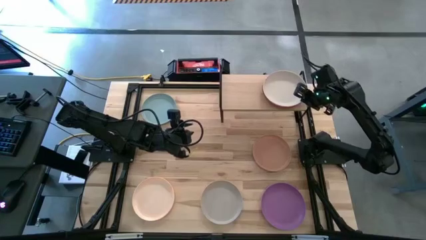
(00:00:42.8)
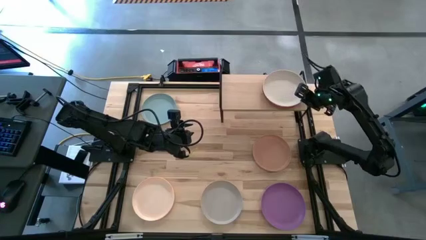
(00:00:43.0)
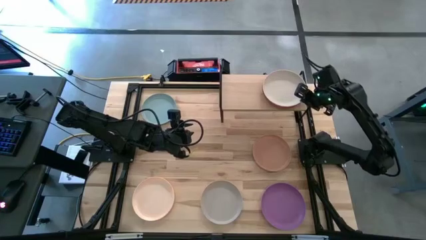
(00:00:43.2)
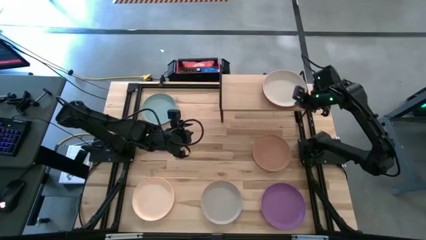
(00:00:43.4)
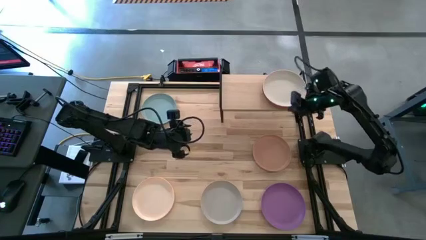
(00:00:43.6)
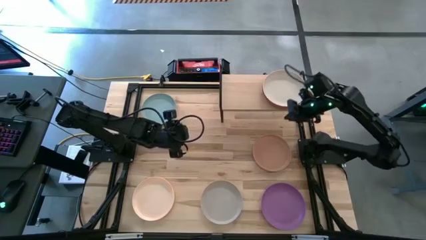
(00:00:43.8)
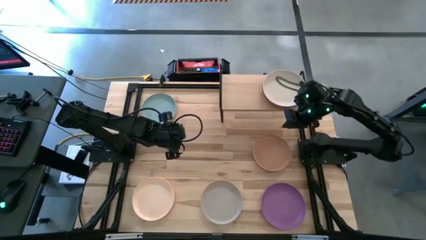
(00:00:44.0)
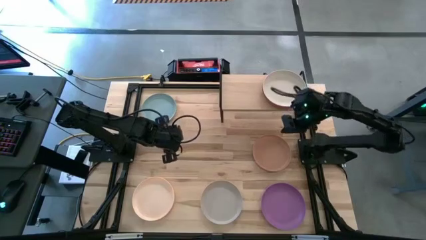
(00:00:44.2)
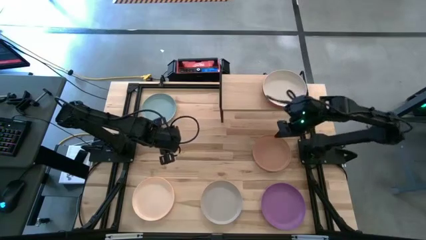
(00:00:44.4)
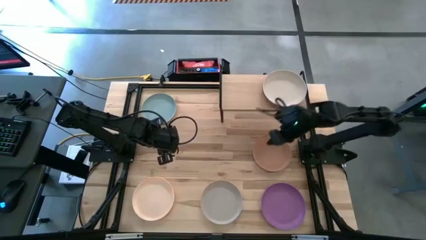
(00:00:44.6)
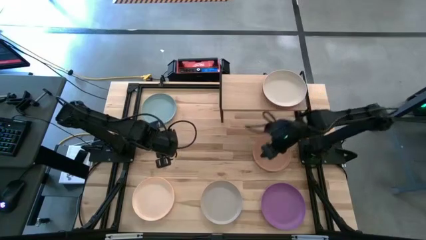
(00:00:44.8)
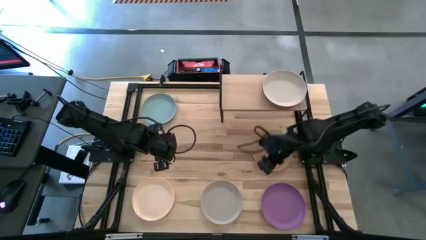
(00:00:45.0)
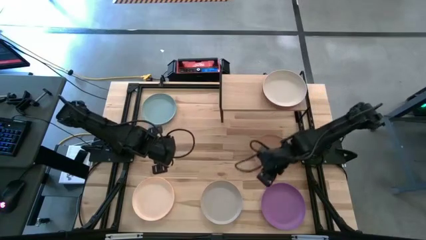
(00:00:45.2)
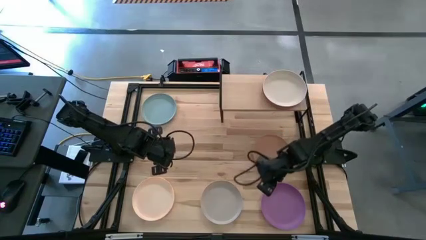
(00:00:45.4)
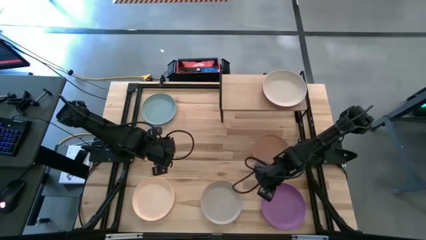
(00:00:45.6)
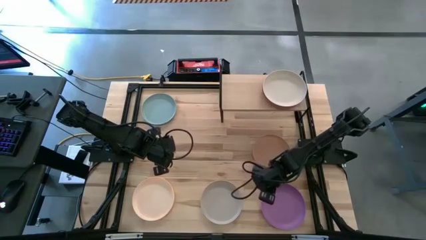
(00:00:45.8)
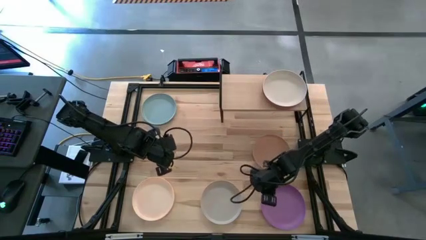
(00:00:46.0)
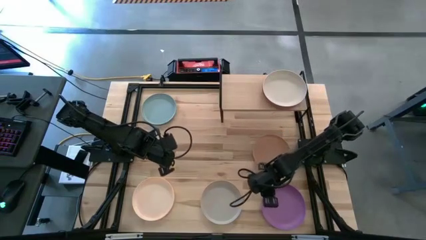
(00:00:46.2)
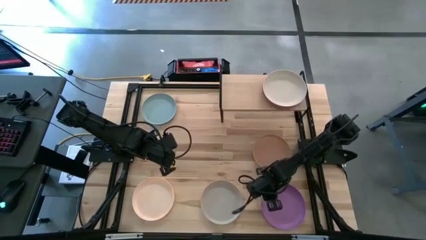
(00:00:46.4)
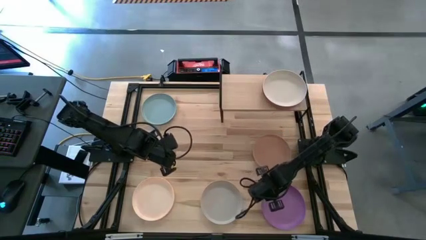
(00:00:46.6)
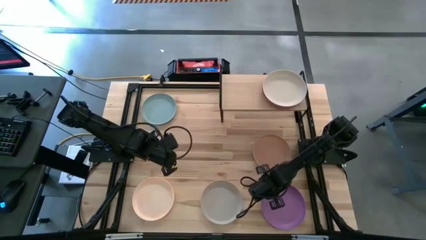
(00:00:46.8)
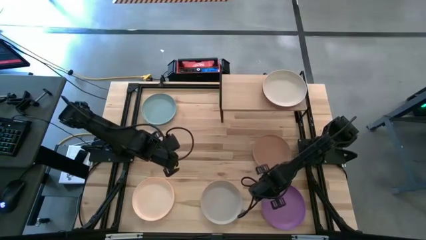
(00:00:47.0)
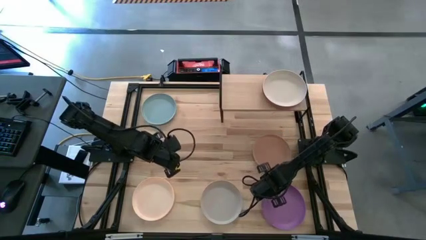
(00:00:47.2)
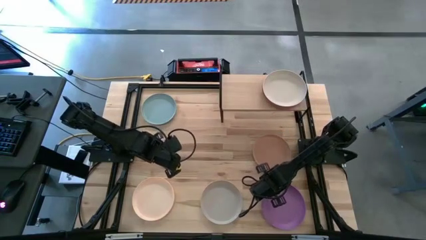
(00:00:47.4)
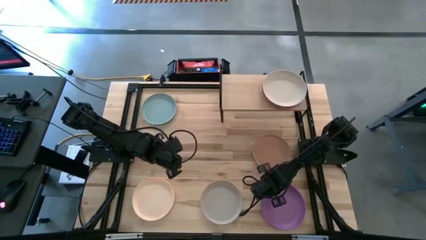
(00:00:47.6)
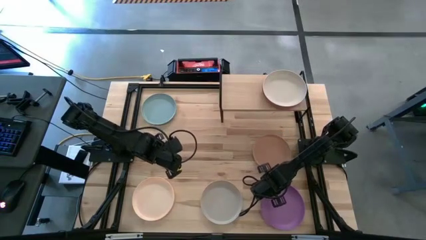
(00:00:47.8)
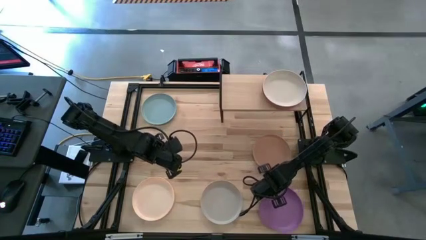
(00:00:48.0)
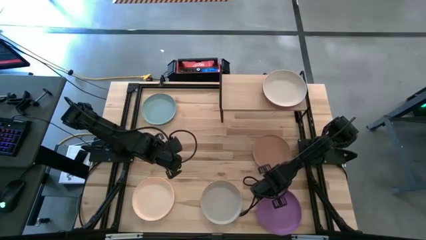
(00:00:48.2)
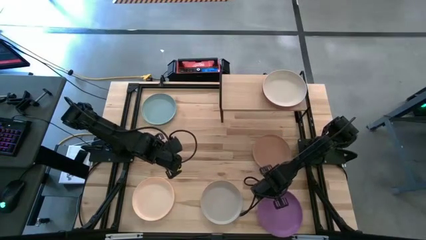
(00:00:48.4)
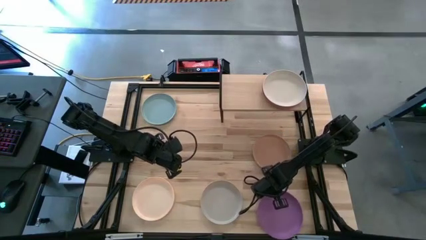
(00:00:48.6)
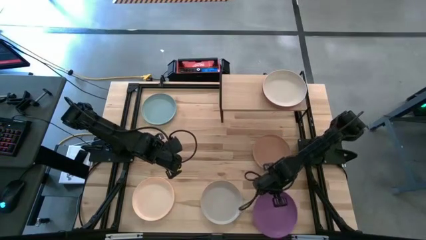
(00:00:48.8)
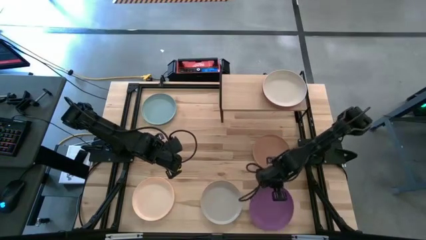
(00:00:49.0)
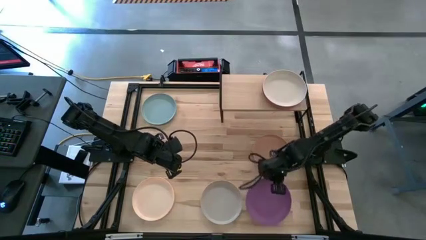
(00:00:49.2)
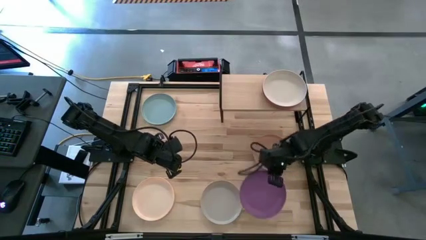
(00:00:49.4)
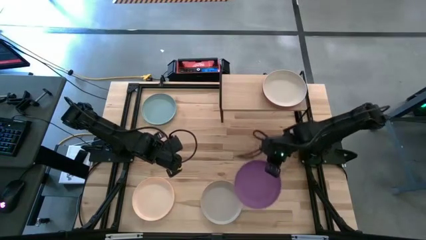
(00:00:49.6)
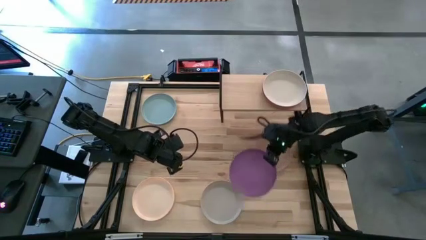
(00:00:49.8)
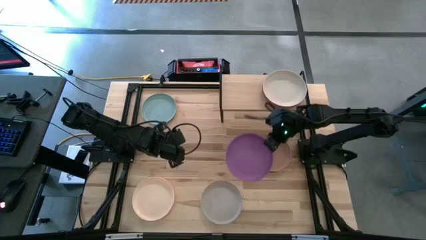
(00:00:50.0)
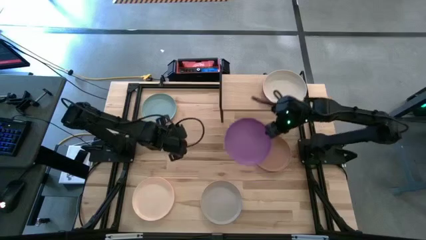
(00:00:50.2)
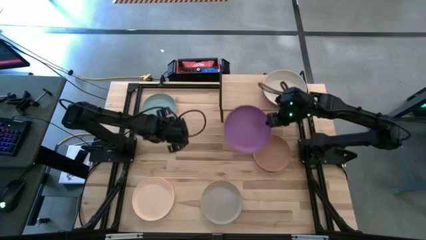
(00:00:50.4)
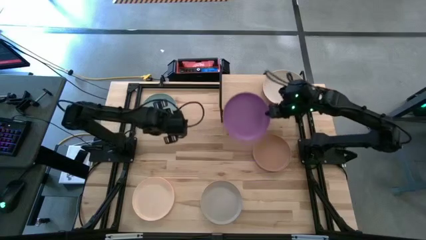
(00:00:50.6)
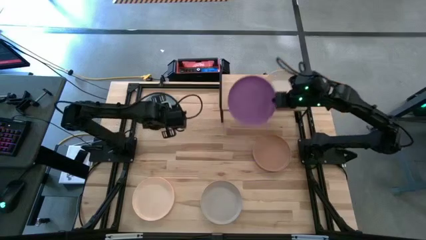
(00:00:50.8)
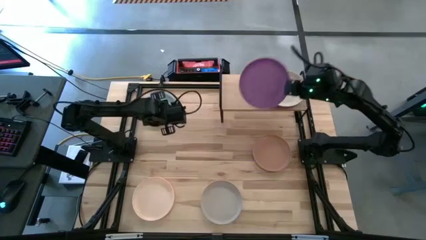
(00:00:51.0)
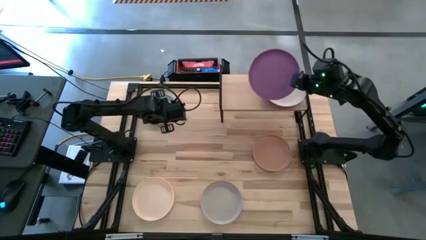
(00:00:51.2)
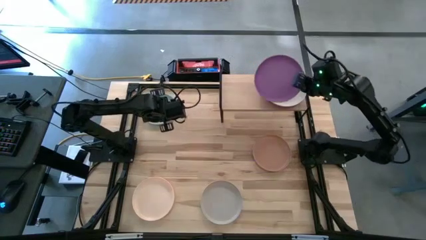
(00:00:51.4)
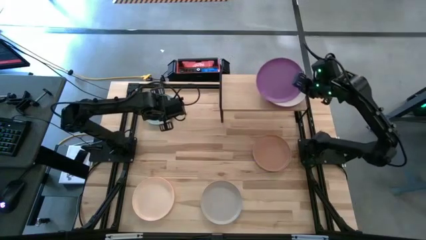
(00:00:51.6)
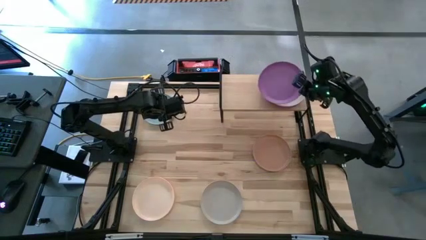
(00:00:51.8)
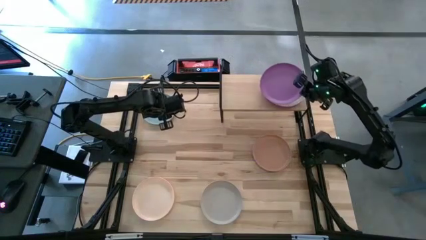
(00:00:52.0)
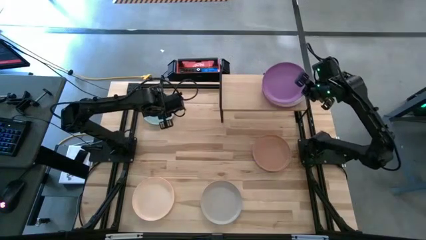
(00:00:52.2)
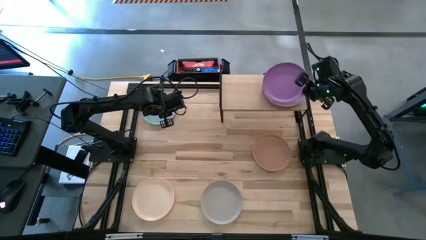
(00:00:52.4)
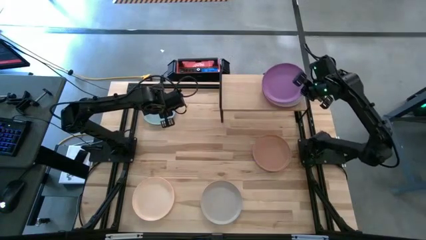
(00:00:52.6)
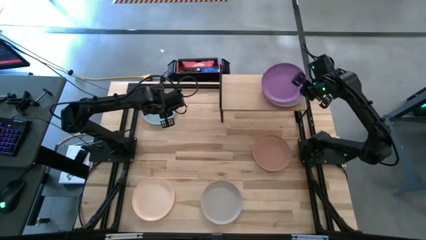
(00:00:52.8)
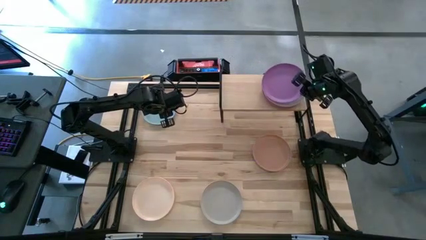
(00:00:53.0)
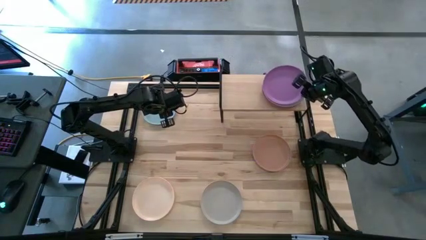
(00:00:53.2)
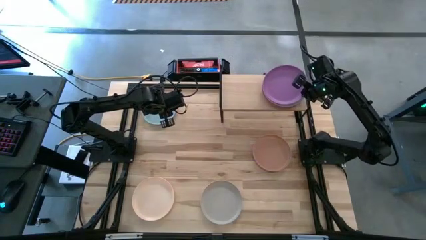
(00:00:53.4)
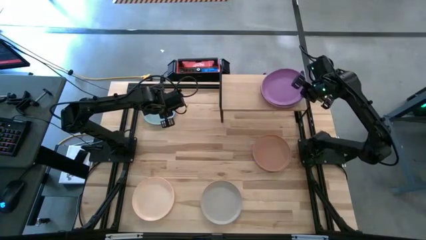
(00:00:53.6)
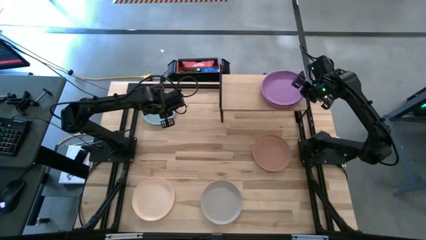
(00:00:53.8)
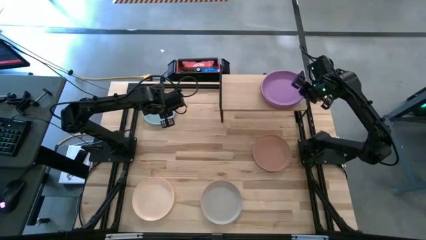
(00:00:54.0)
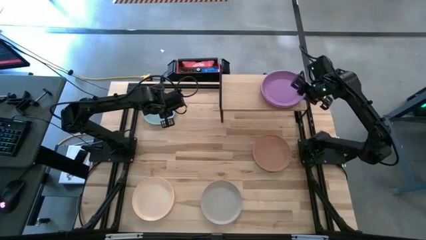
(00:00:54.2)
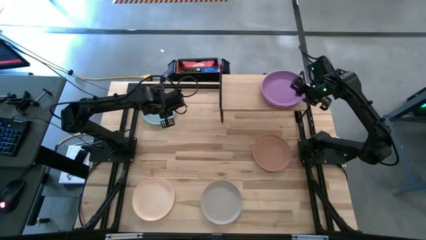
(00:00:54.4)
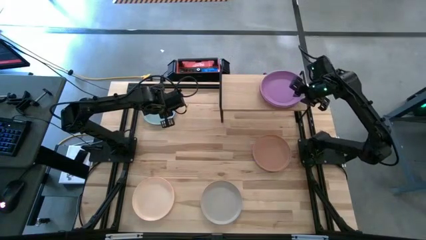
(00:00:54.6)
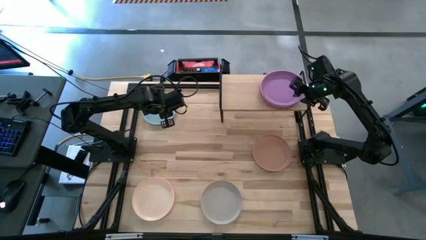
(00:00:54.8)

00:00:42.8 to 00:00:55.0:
Task: Place and stack plates onto a shelf
Stack the purple plate on top of the white plate on the shelf
